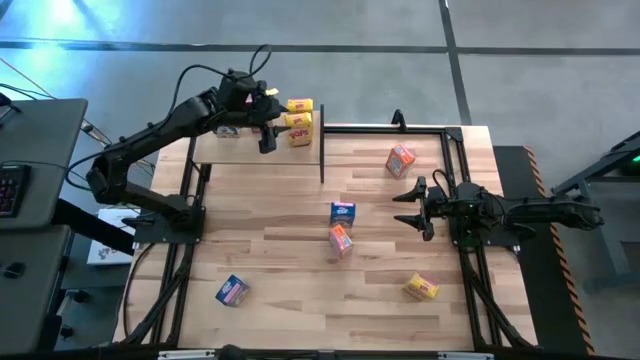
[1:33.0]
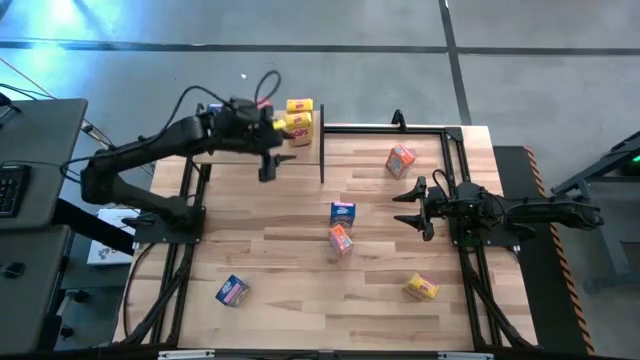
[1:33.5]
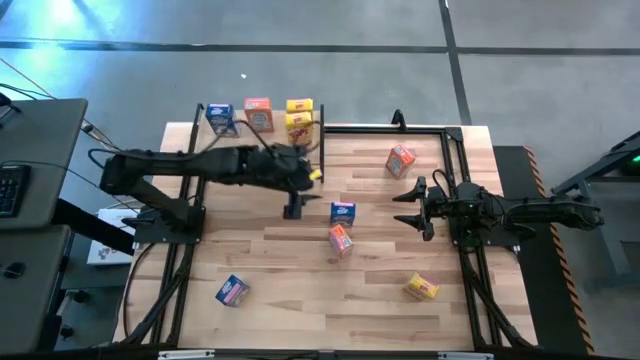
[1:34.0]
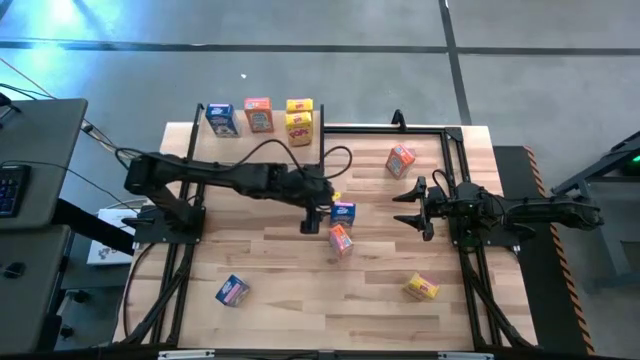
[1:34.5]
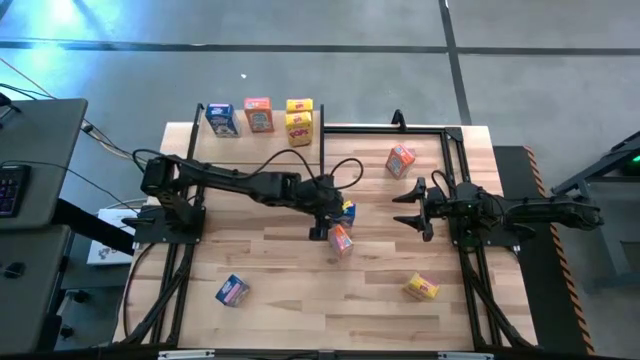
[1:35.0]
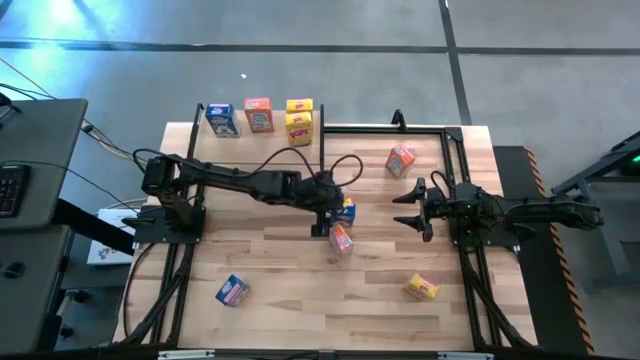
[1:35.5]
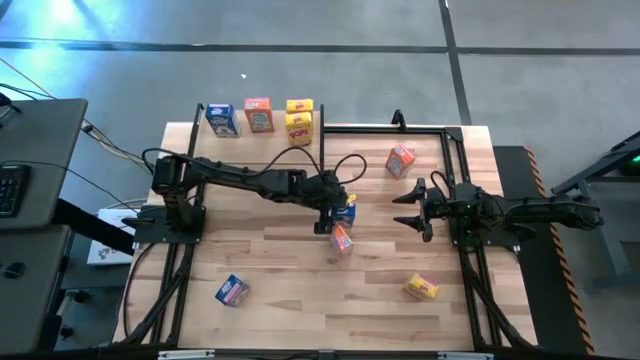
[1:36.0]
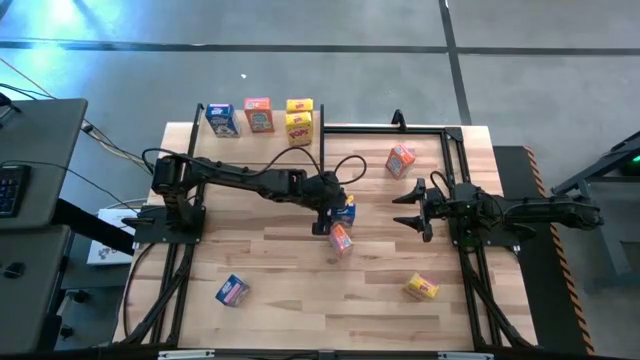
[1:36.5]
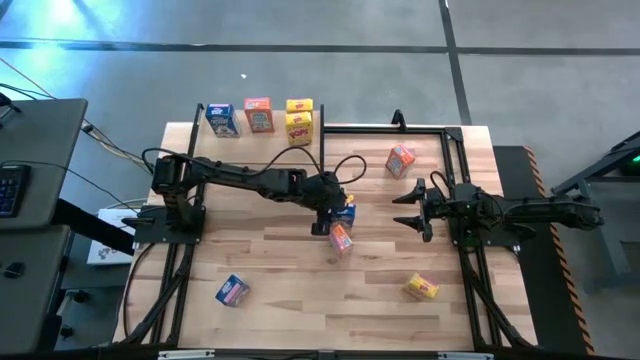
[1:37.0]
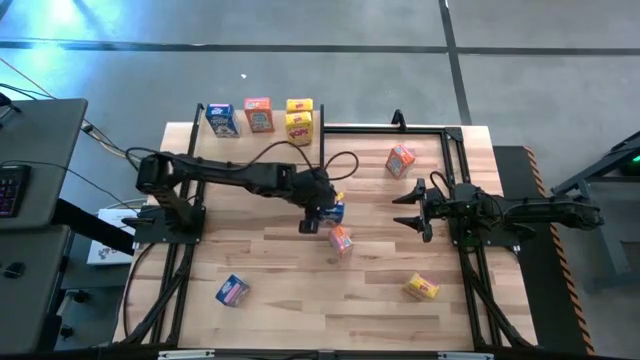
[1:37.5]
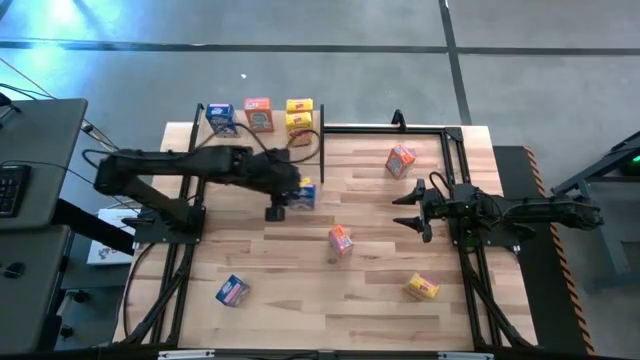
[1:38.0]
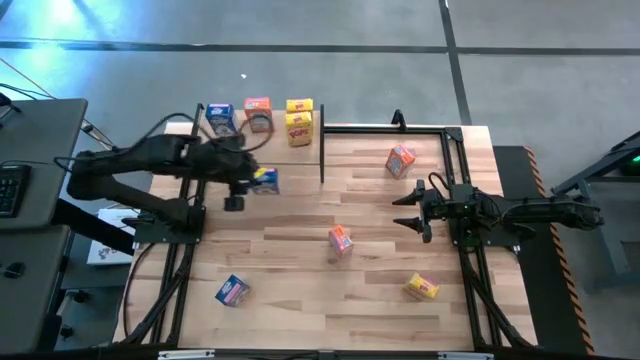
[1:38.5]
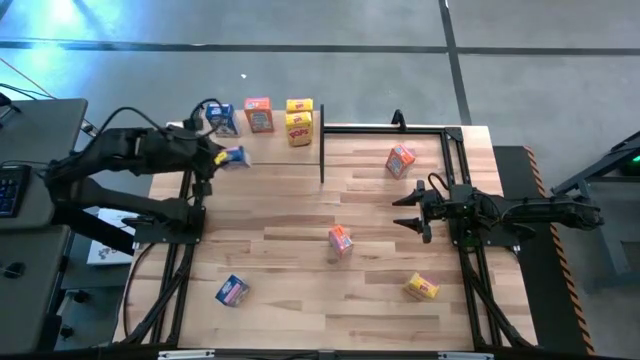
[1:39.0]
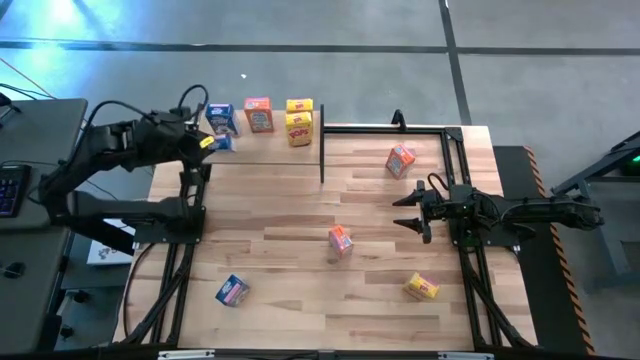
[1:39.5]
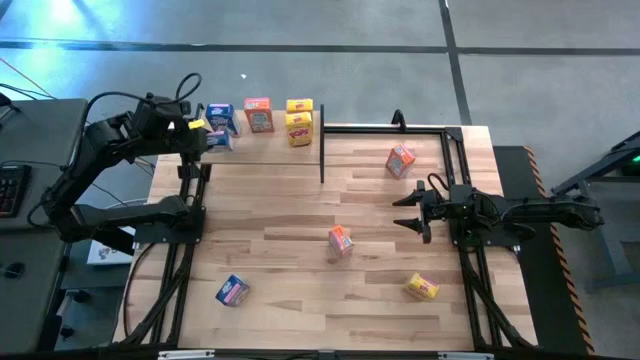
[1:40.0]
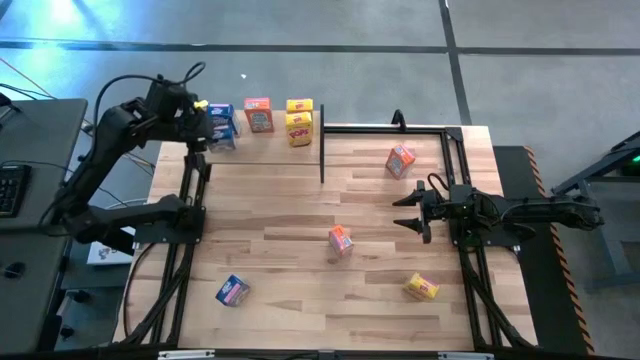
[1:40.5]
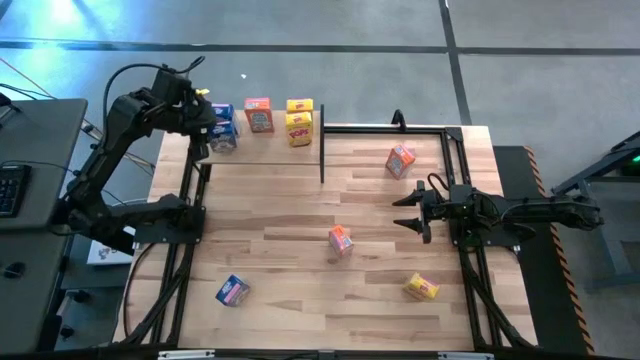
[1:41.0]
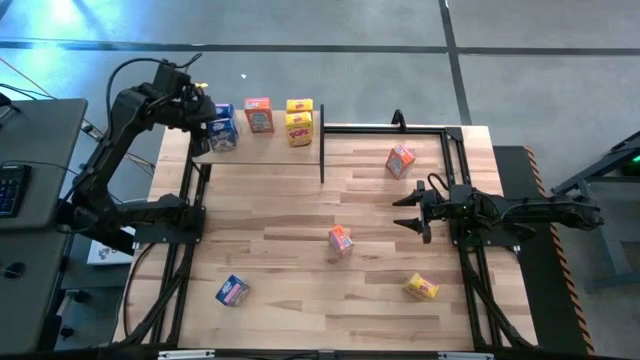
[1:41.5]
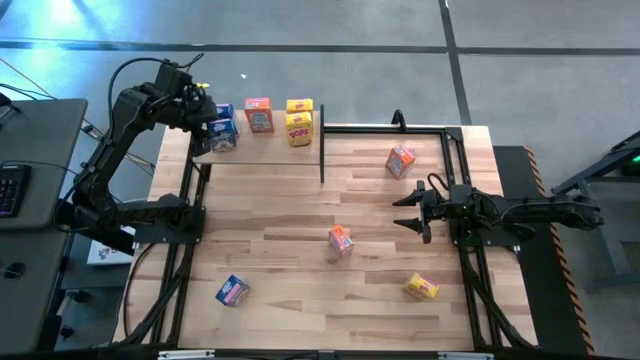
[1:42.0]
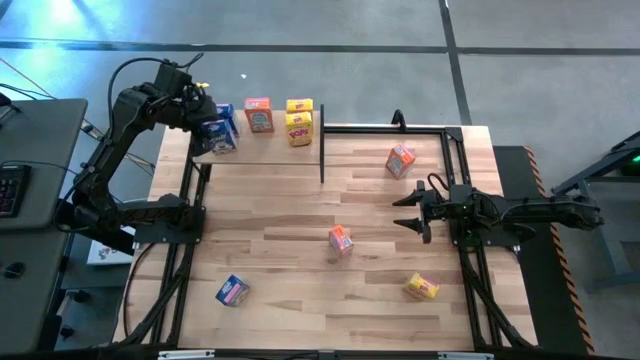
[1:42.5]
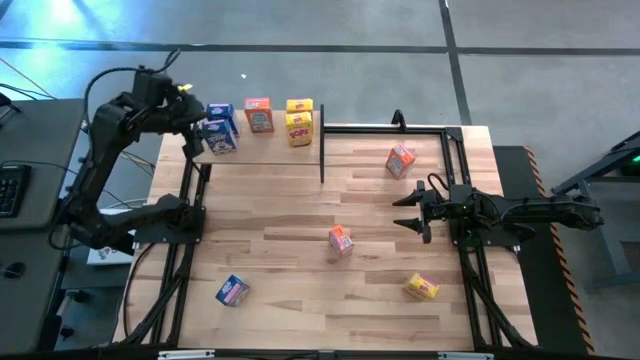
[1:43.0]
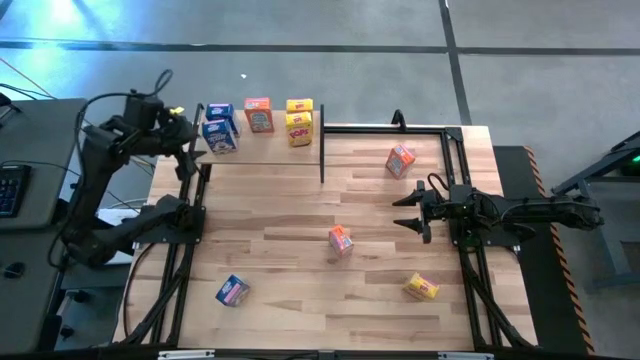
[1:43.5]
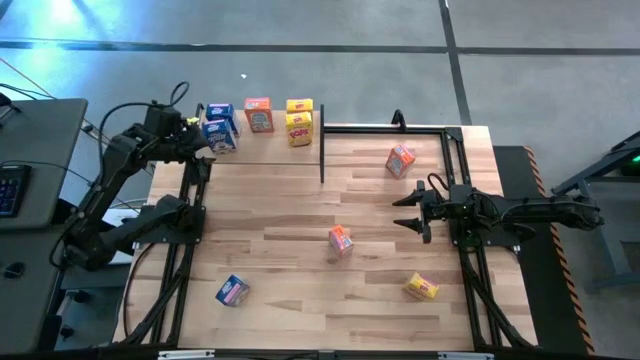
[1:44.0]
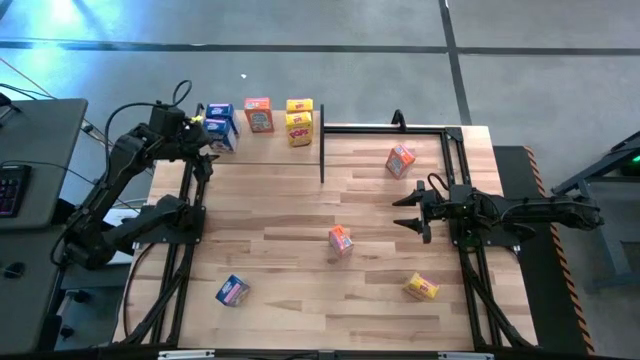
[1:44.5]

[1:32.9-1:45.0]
Task: Stack cereal on shelf
Put the right blue cereal box on the shelf aligned with the other blue cereal box

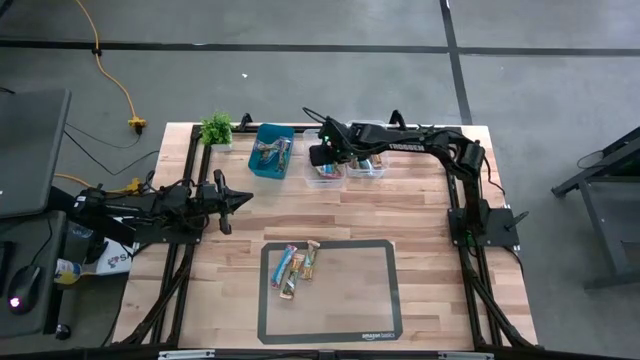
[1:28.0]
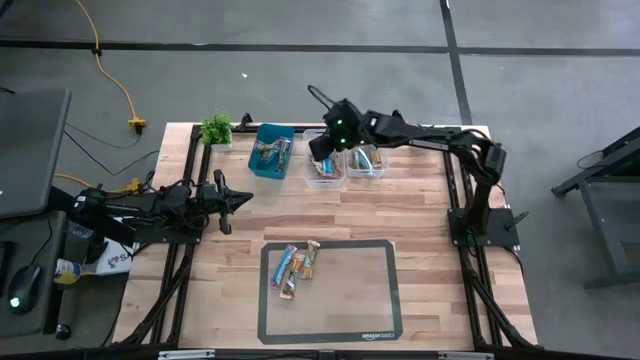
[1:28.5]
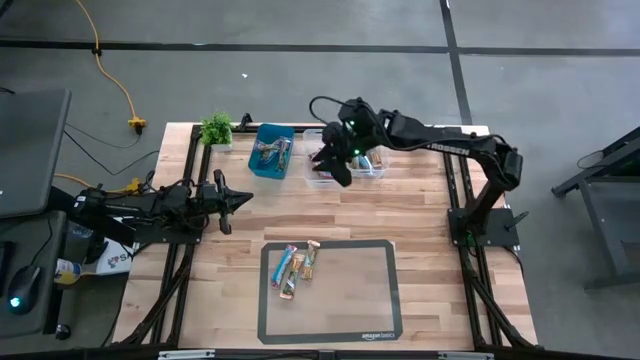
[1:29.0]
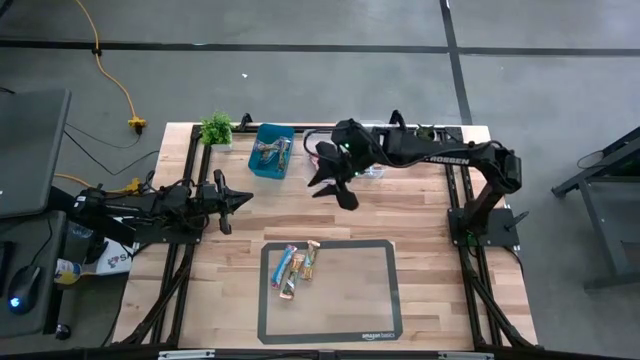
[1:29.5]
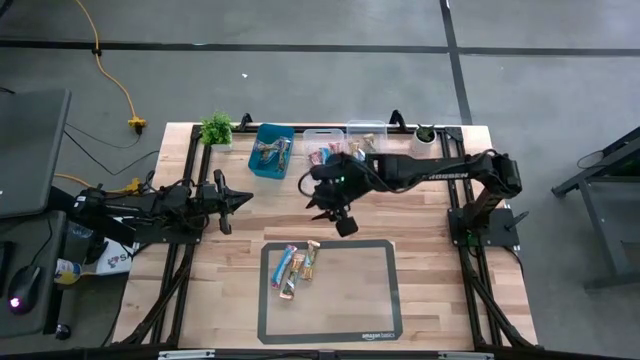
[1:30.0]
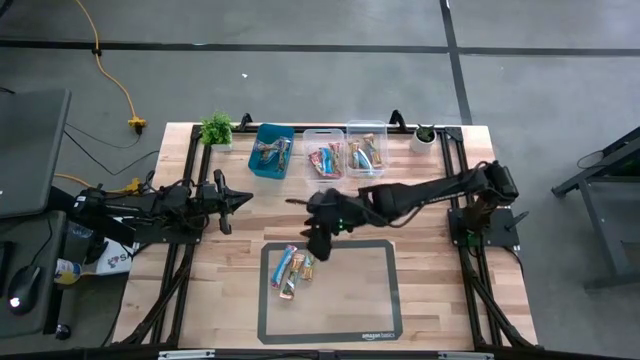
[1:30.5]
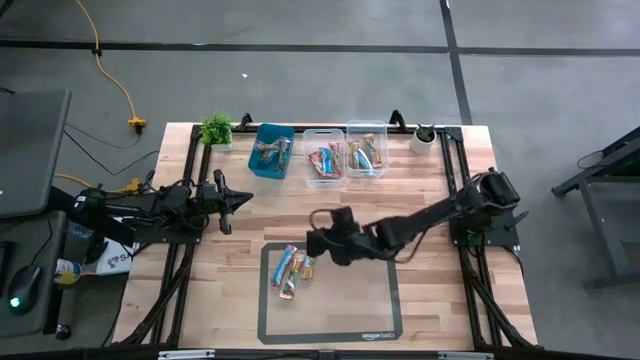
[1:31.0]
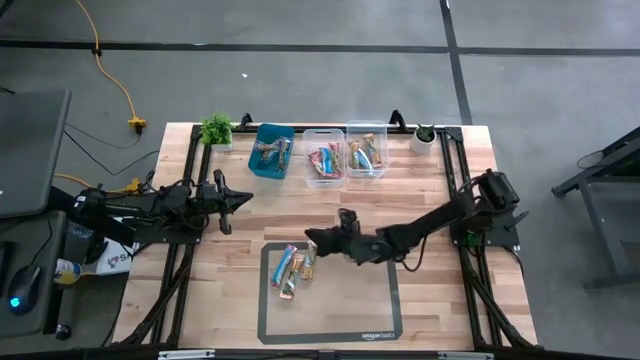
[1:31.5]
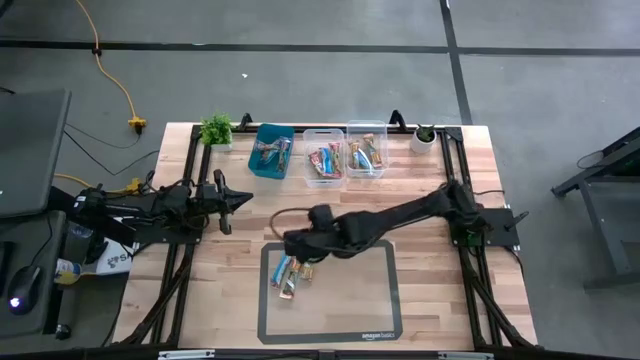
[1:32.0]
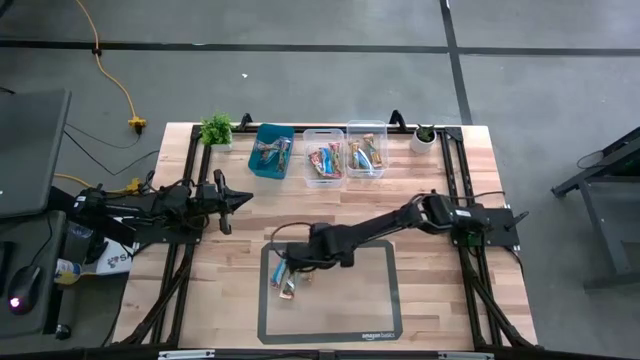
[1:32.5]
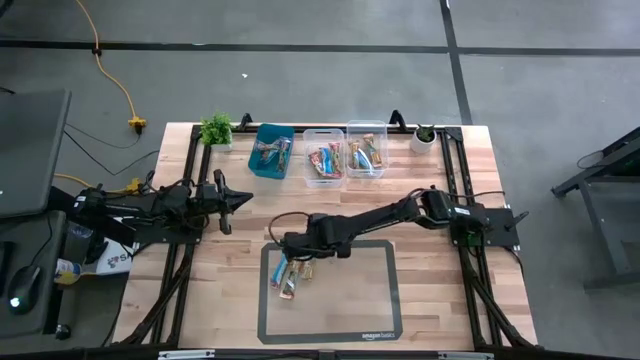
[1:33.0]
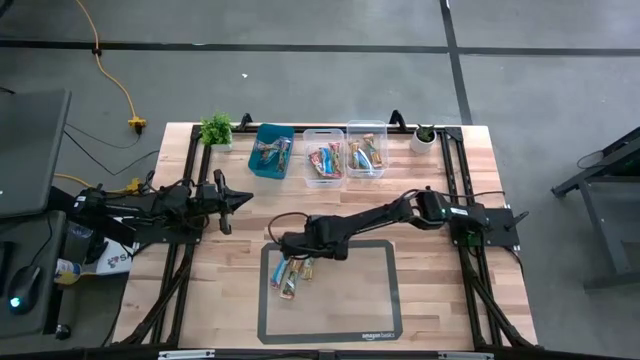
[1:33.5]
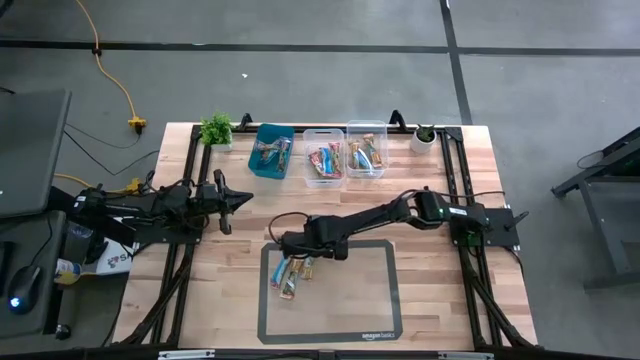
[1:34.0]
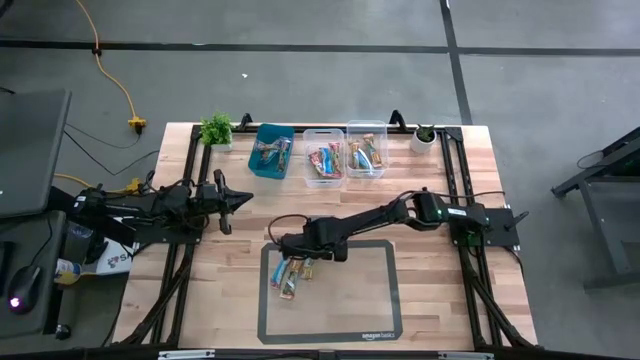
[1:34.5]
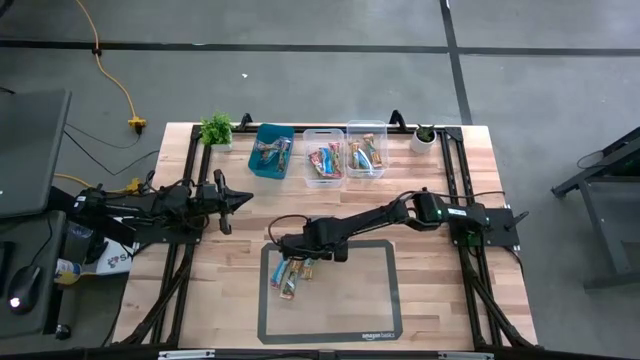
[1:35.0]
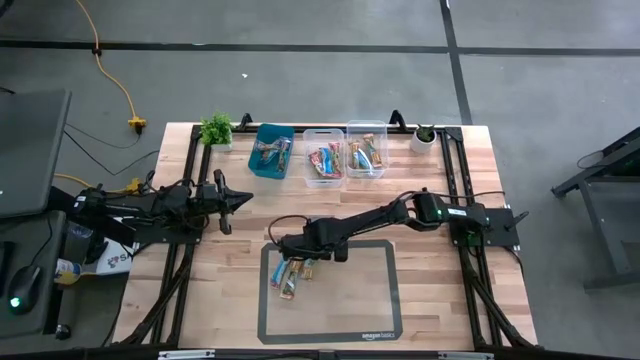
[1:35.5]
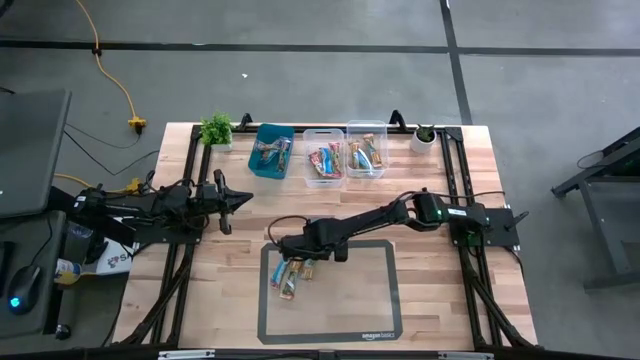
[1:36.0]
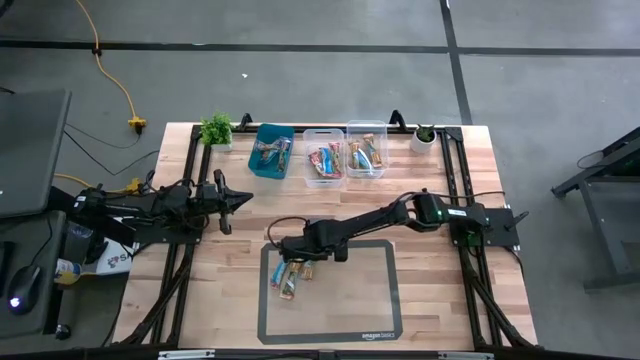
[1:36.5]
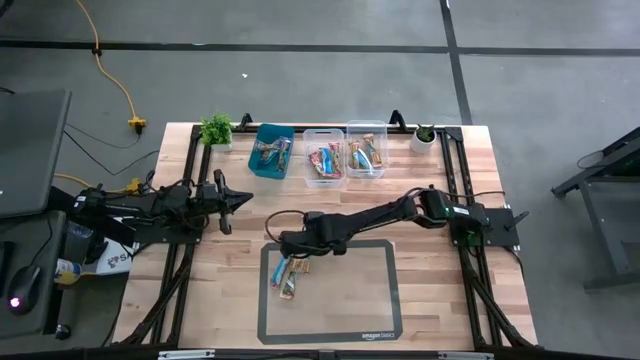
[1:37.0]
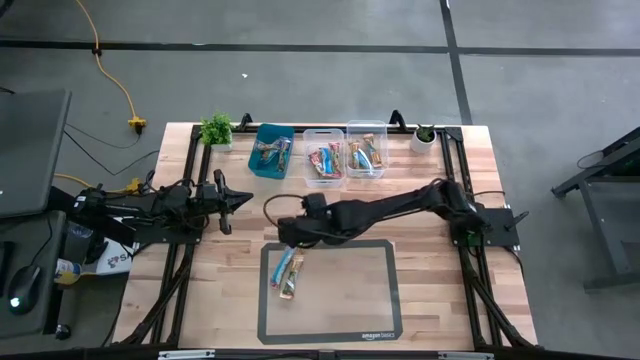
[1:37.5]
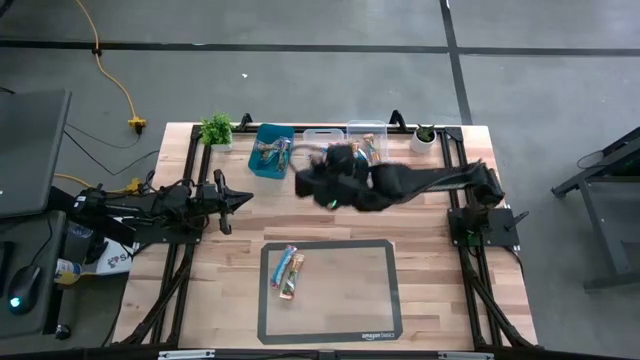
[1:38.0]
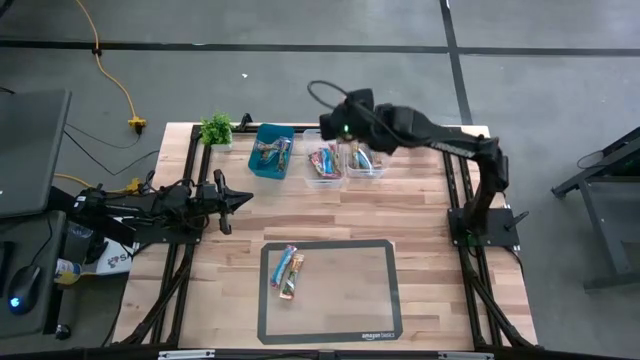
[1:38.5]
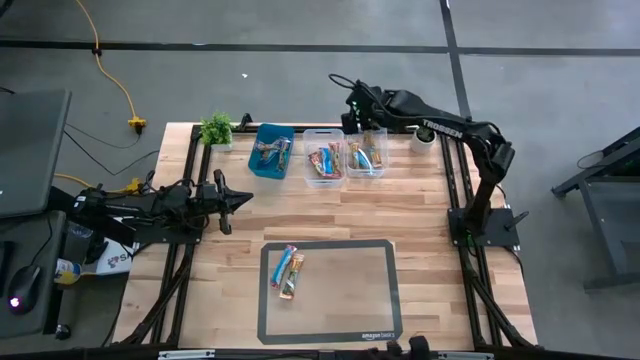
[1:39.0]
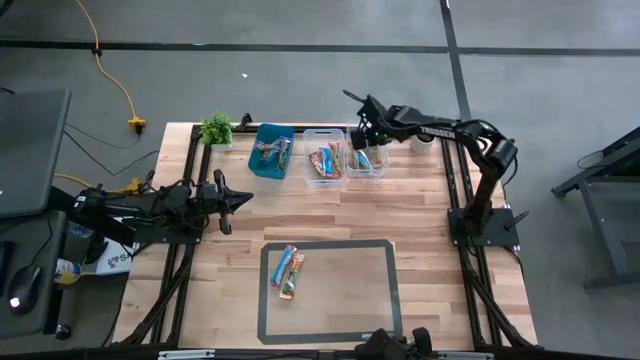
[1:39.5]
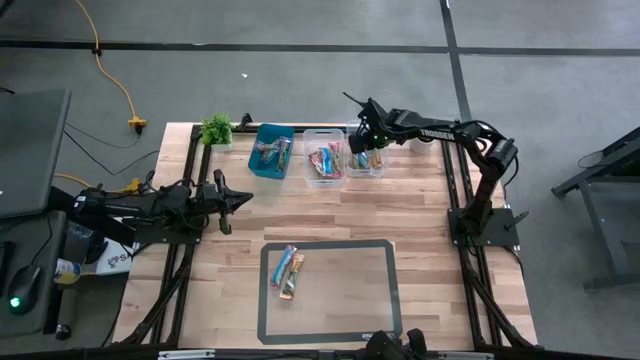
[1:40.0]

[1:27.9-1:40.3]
Task: Pick and place Granola Bars by type
Put the right yellow granola bar into the right transparent bin
